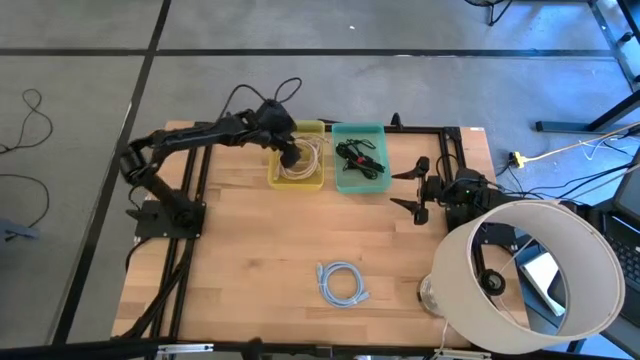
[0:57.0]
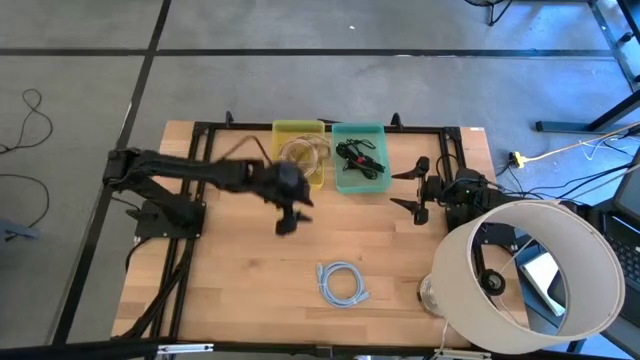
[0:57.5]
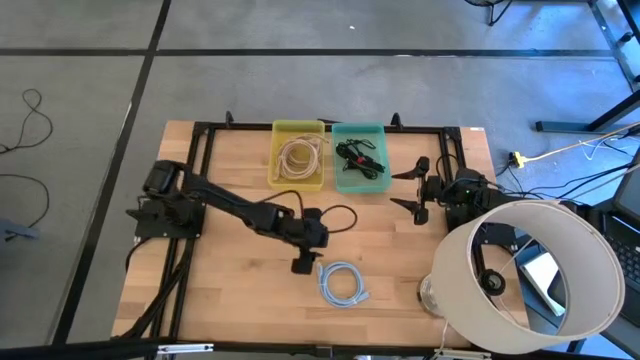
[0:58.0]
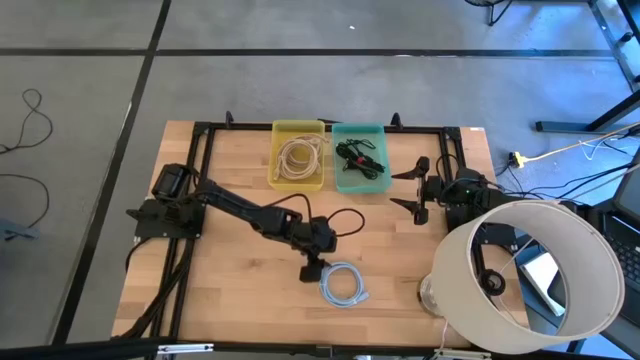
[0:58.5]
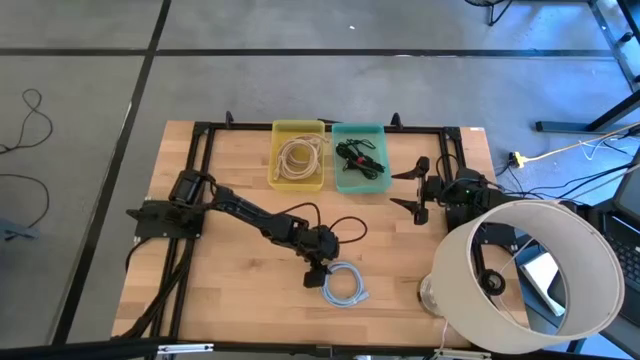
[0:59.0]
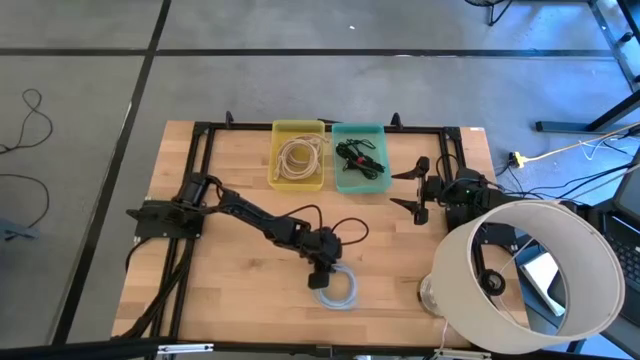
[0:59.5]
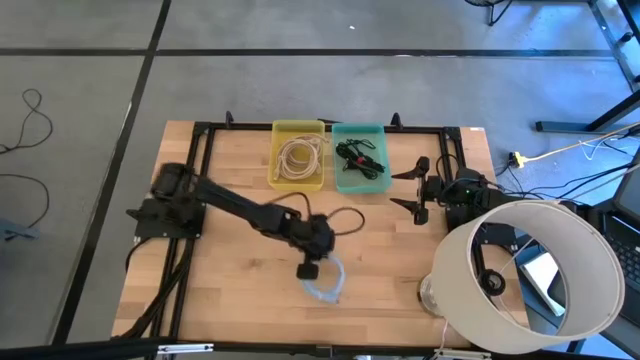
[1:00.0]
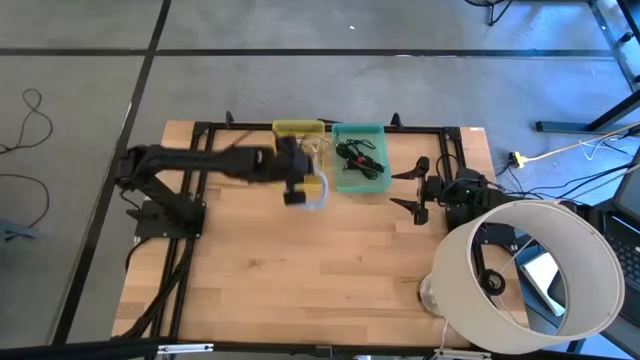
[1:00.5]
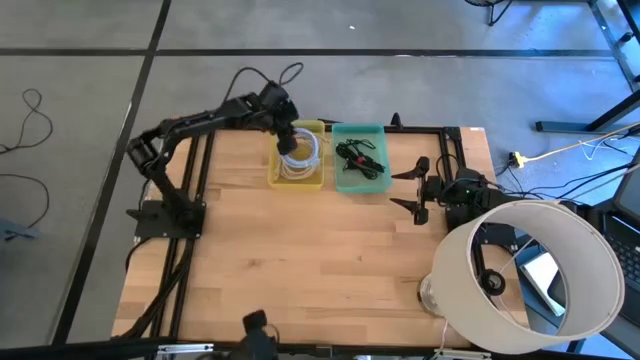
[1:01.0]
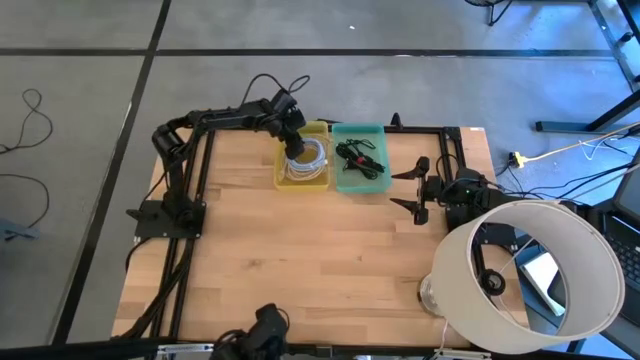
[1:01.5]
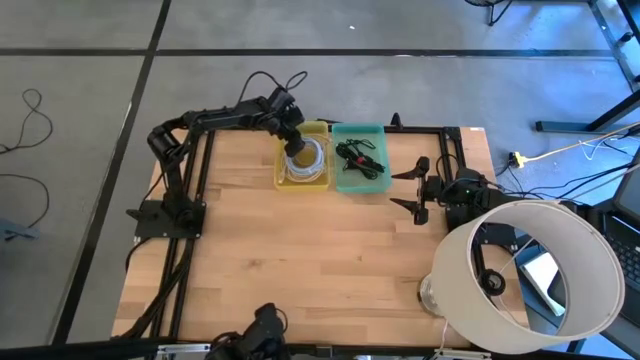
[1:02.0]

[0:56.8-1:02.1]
Put the light blue HDMI cable into the yellow bin

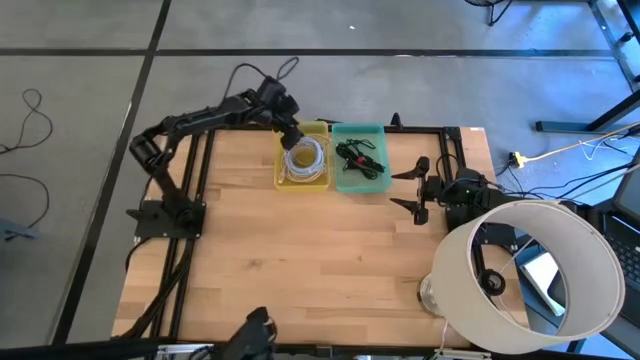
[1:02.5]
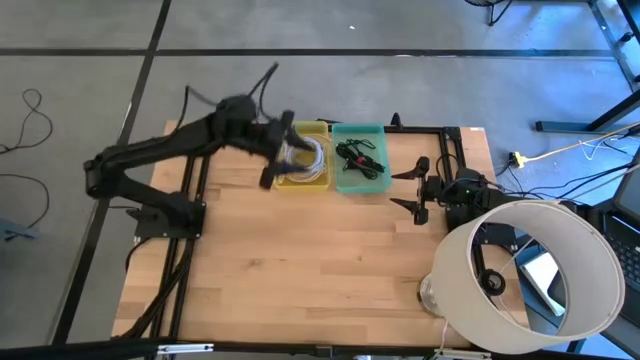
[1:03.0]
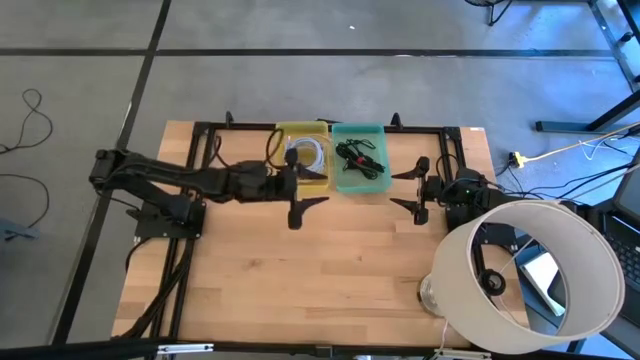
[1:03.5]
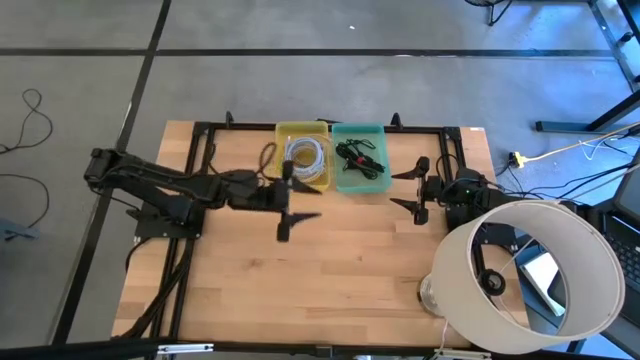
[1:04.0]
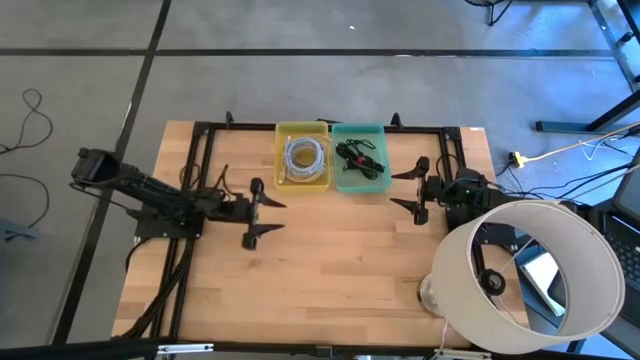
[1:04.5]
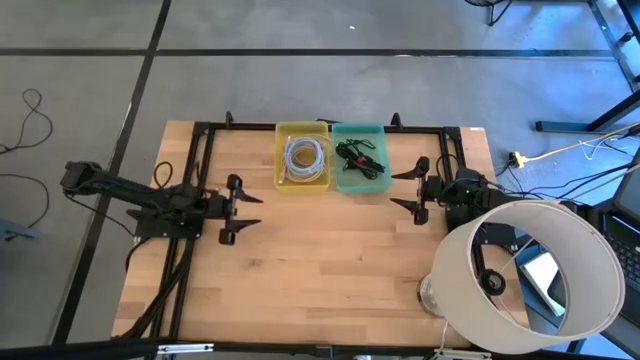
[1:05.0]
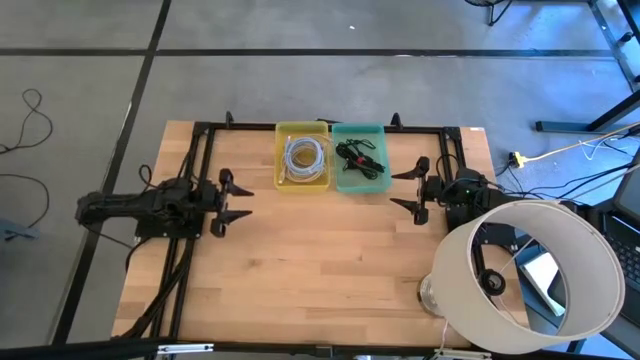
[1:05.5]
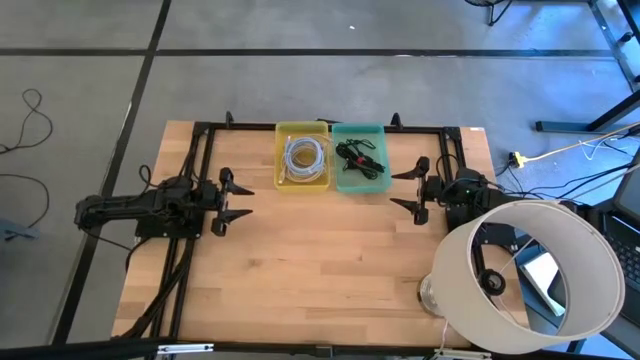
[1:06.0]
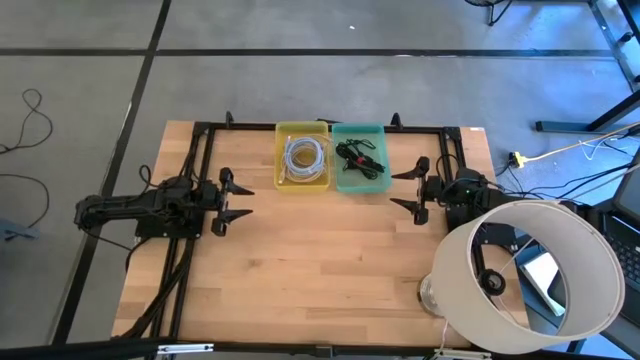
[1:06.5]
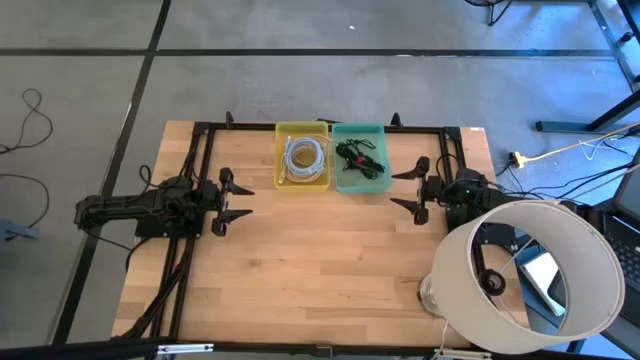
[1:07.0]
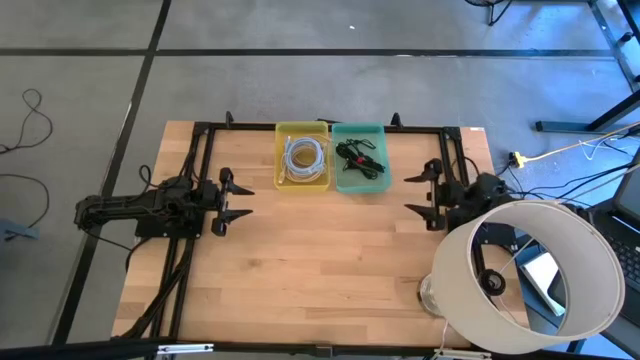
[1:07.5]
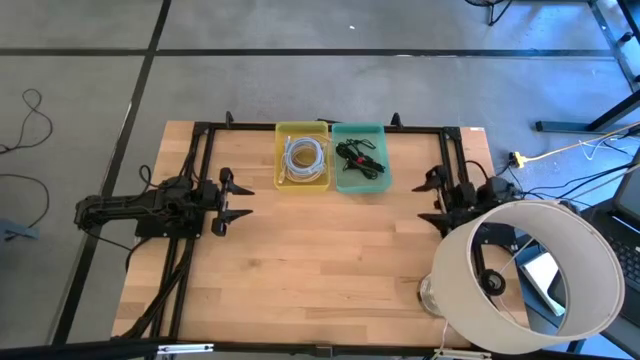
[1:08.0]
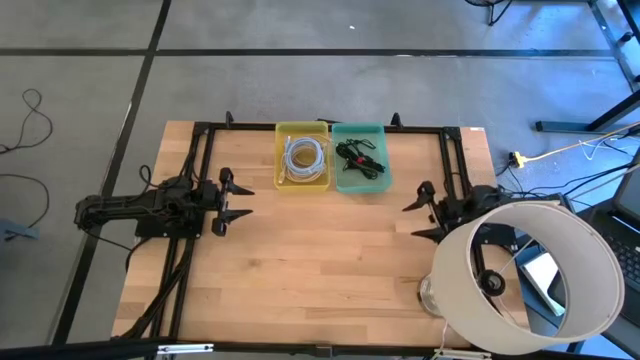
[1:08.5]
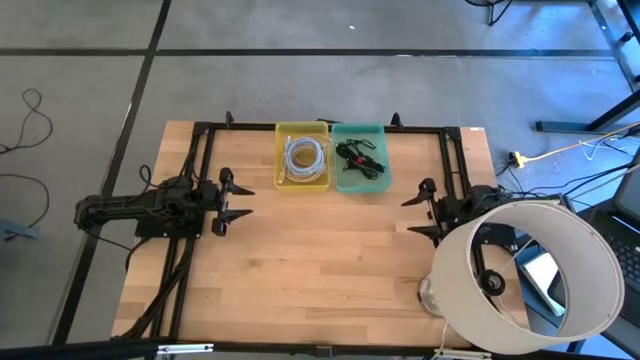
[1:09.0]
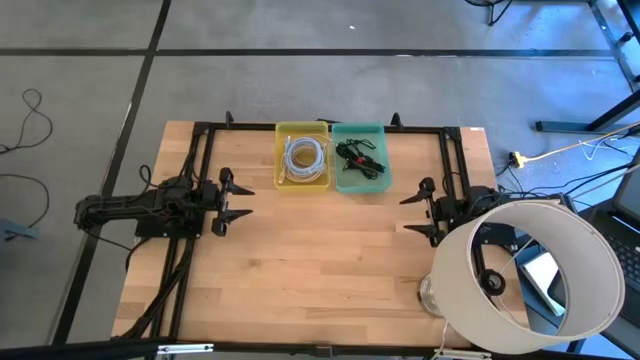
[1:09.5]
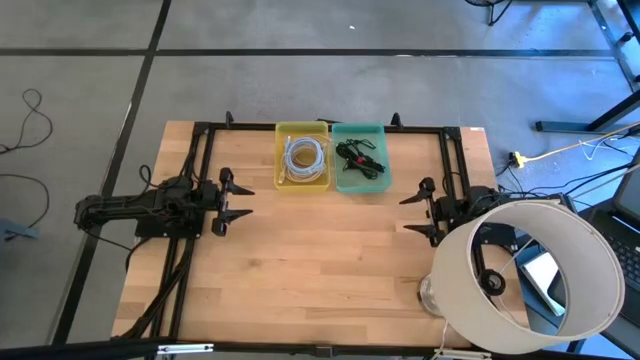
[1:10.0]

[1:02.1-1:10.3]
Return to Home Position

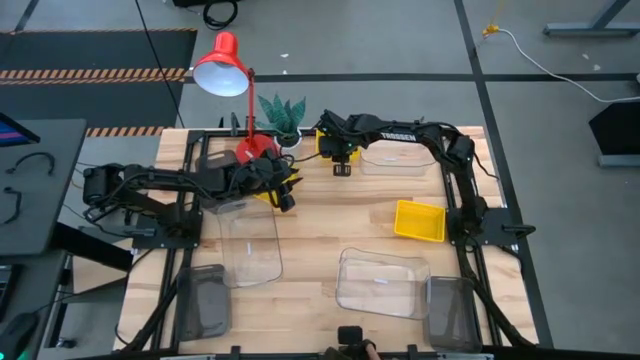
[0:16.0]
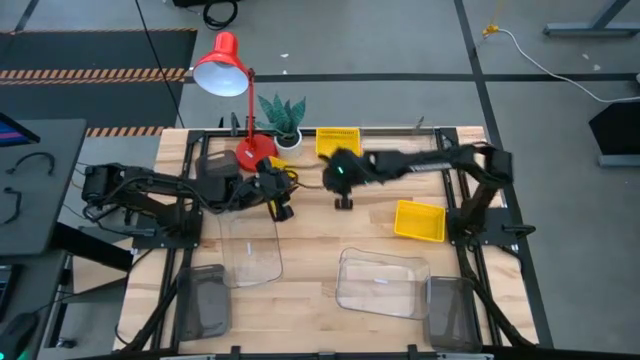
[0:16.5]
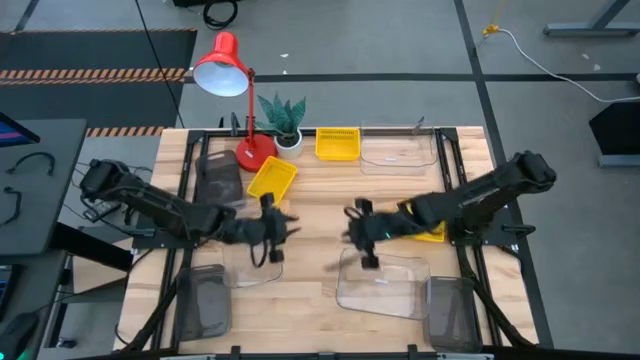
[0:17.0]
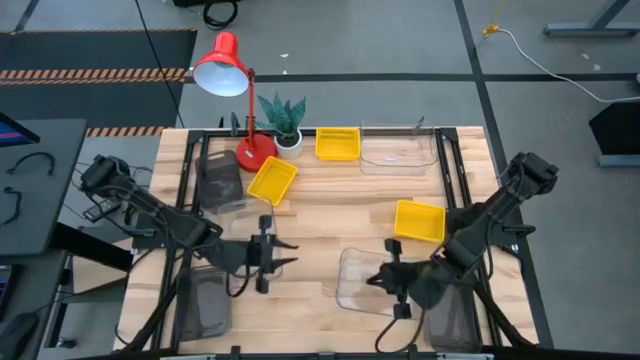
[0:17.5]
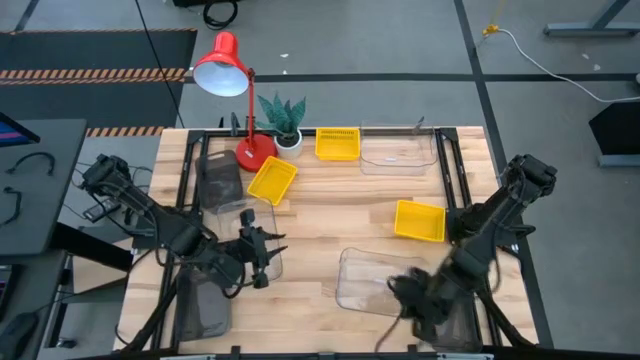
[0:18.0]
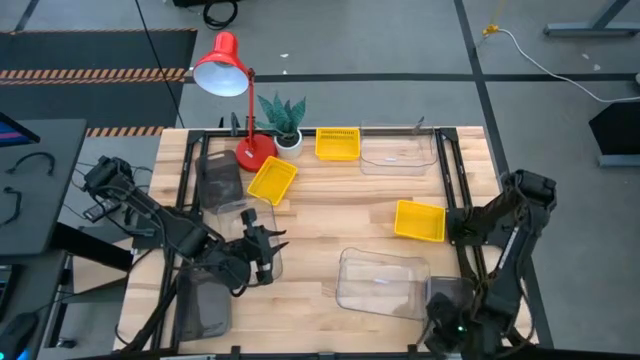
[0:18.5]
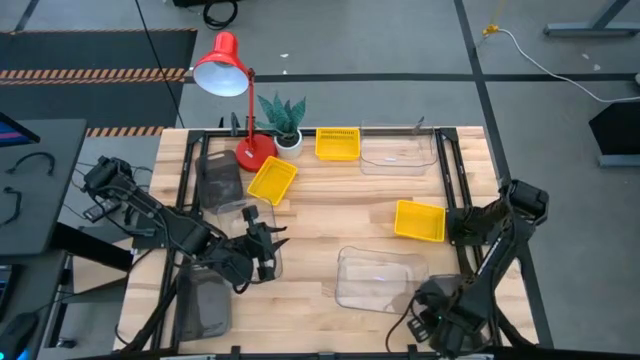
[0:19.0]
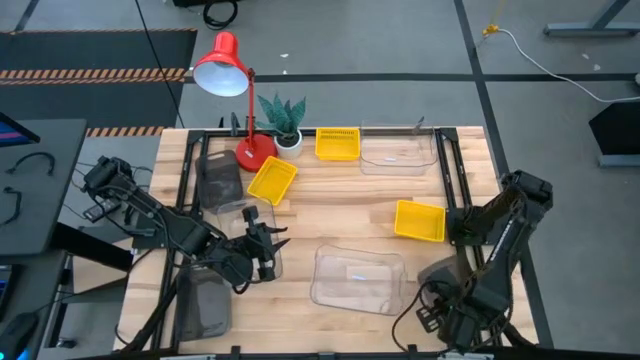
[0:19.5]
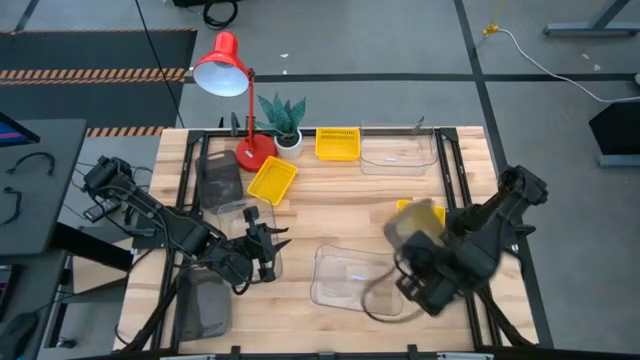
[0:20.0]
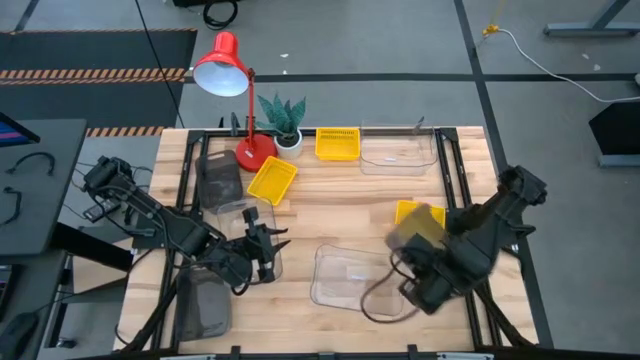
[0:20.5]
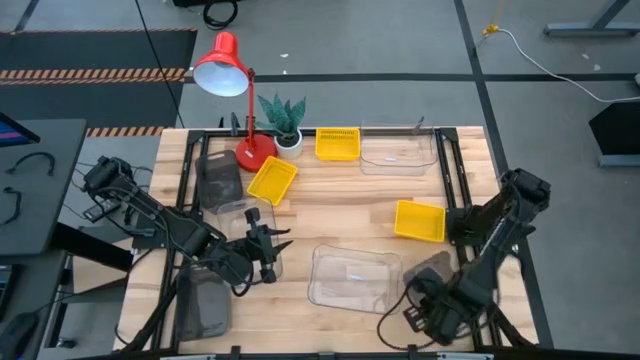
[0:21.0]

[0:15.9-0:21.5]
Adjust the bottom right black transparent bin on the table

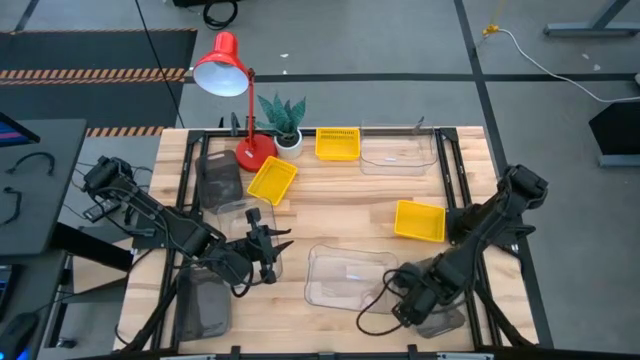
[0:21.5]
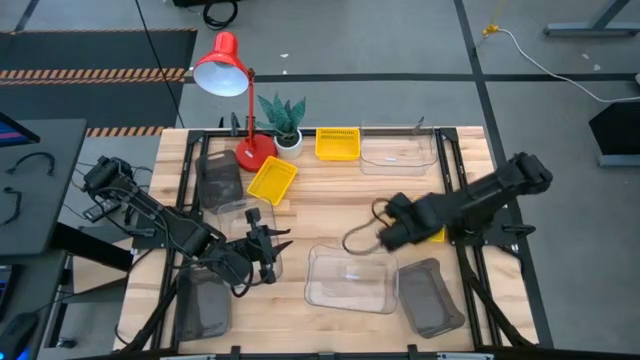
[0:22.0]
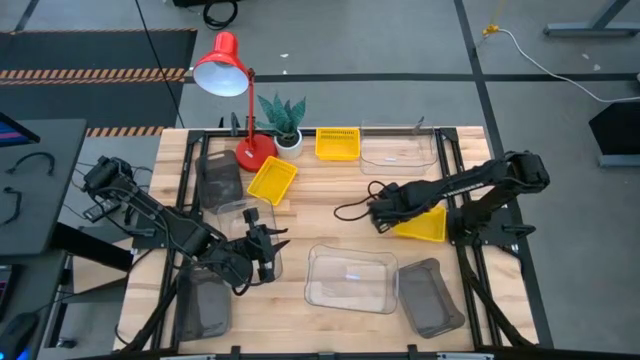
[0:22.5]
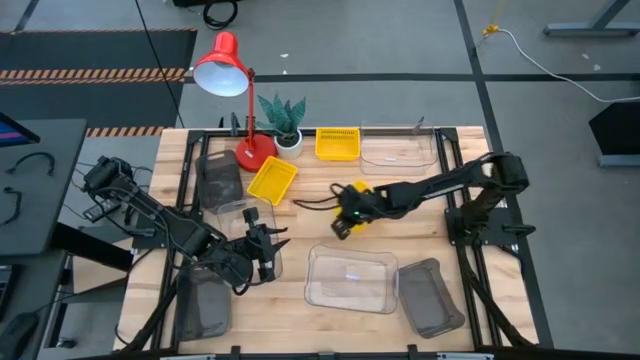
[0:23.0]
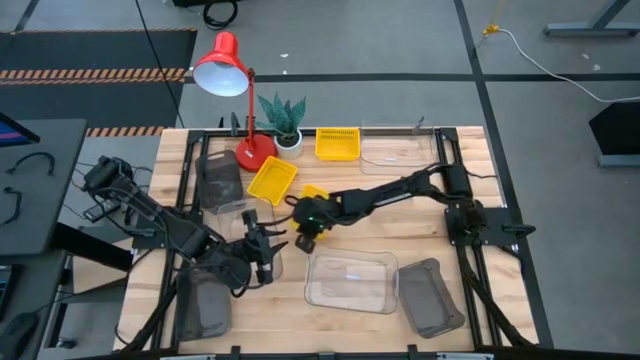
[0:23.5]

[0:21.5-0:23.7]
Move the bottom right yellow bin to the center of the table
